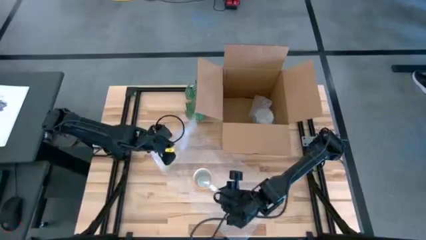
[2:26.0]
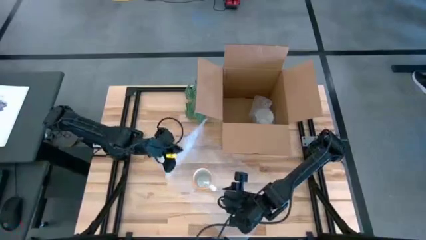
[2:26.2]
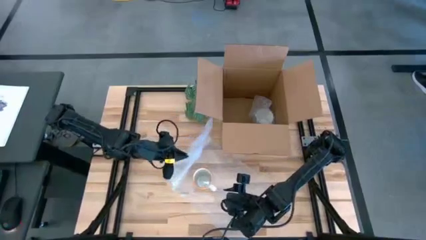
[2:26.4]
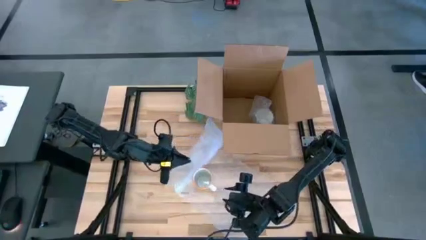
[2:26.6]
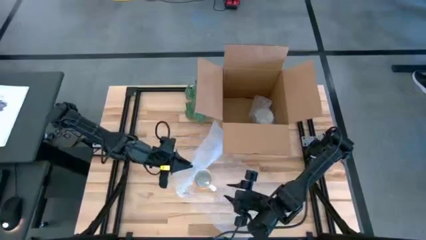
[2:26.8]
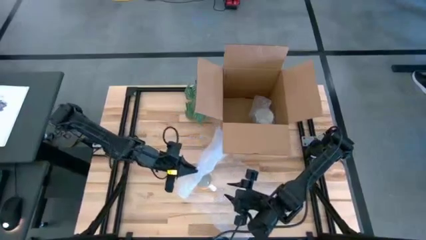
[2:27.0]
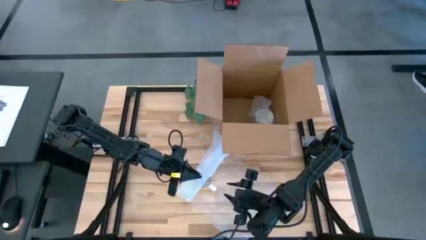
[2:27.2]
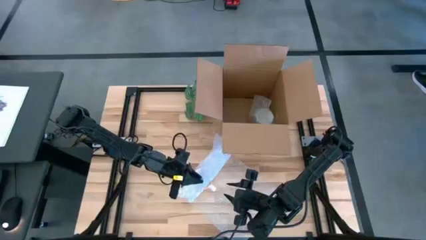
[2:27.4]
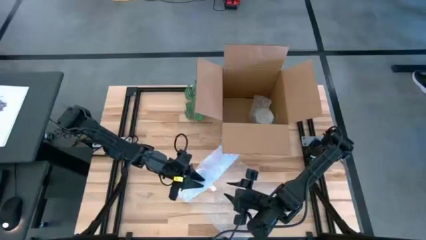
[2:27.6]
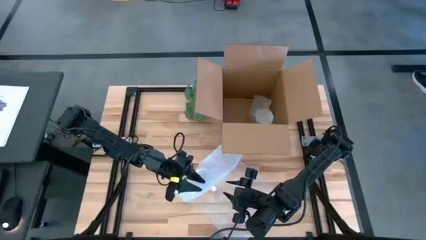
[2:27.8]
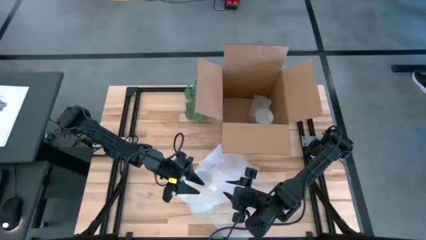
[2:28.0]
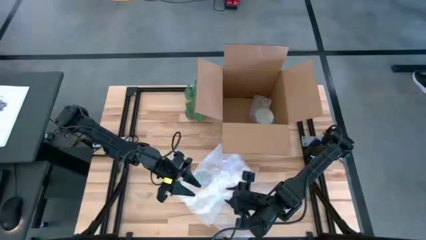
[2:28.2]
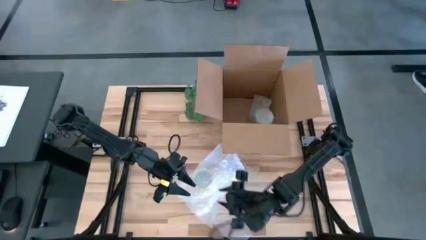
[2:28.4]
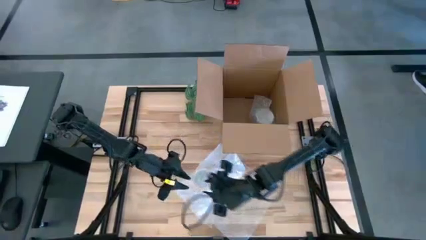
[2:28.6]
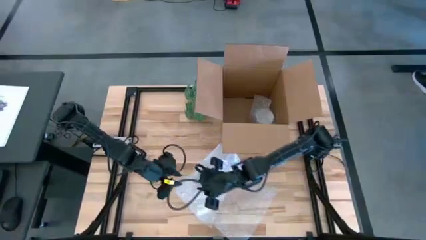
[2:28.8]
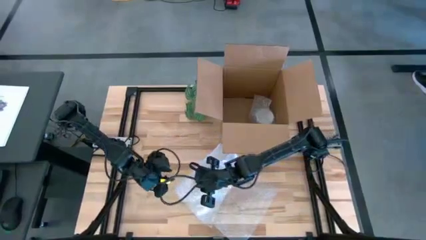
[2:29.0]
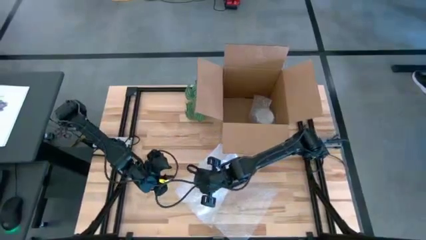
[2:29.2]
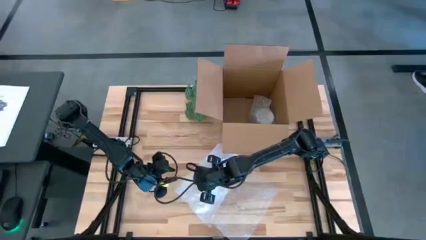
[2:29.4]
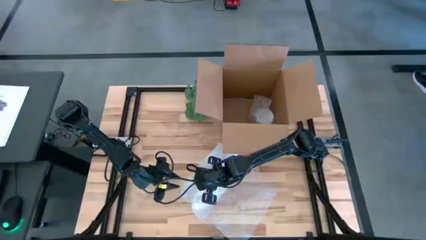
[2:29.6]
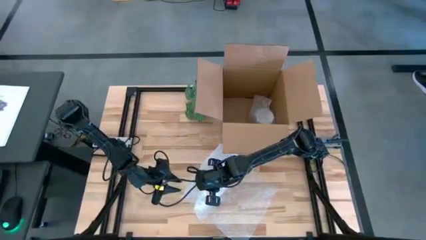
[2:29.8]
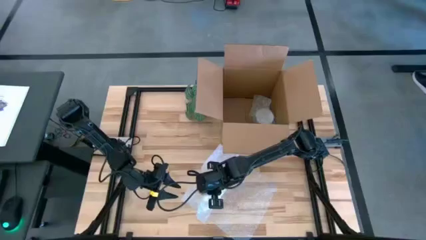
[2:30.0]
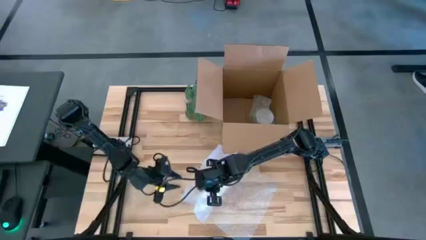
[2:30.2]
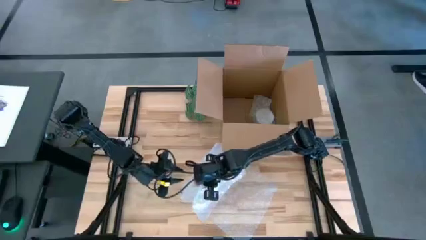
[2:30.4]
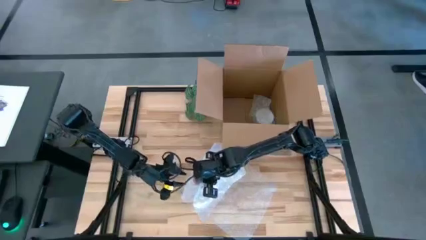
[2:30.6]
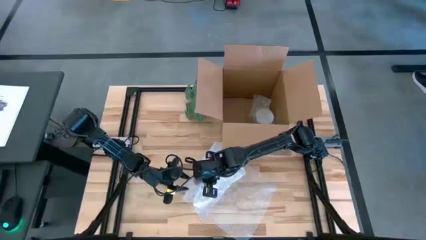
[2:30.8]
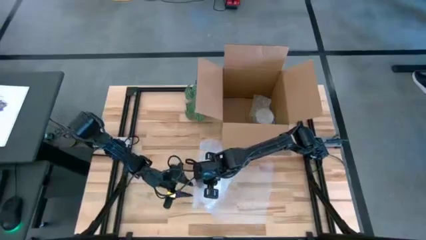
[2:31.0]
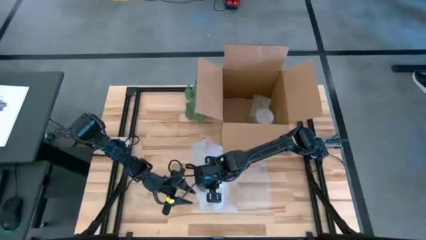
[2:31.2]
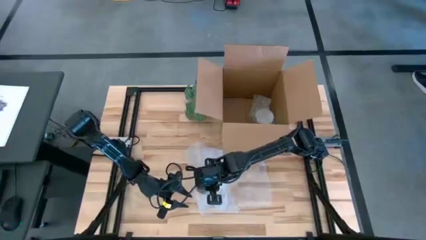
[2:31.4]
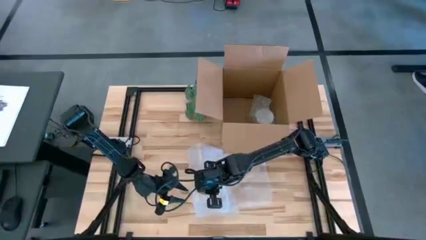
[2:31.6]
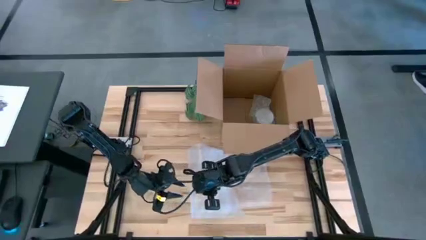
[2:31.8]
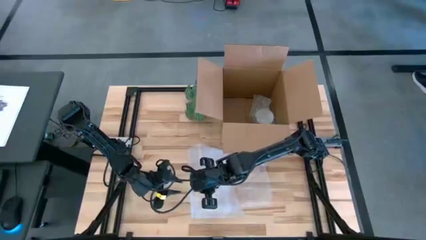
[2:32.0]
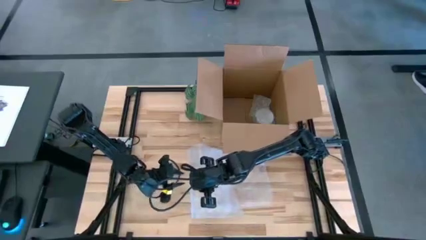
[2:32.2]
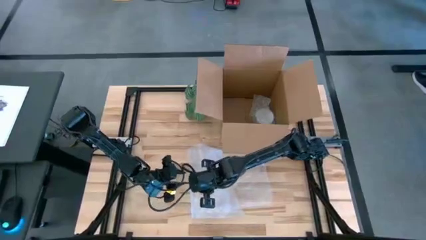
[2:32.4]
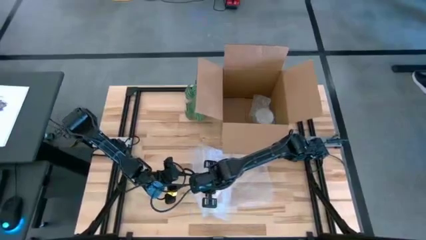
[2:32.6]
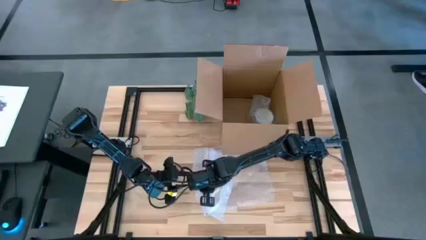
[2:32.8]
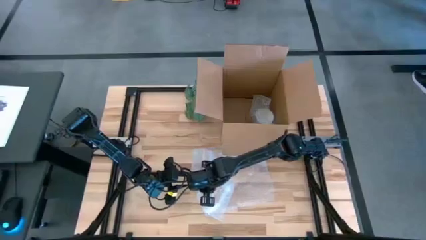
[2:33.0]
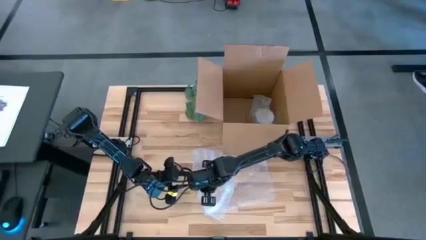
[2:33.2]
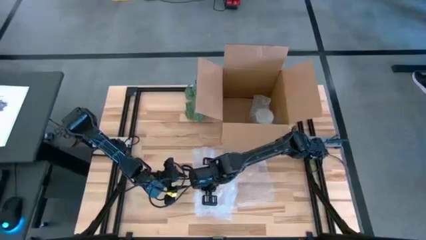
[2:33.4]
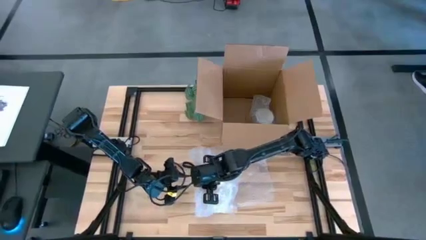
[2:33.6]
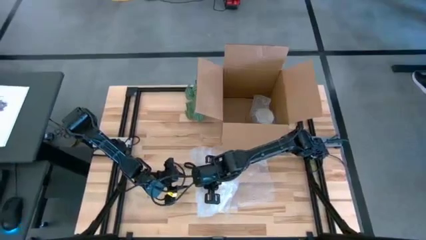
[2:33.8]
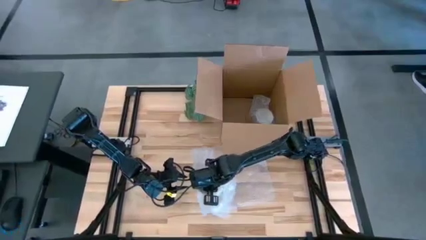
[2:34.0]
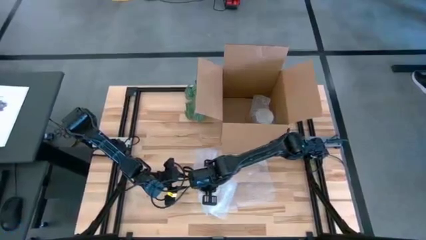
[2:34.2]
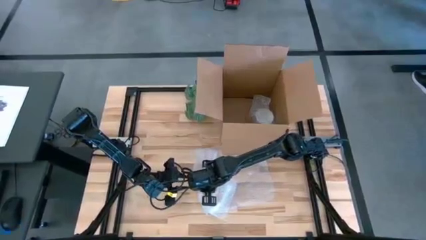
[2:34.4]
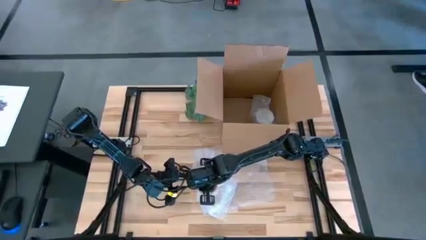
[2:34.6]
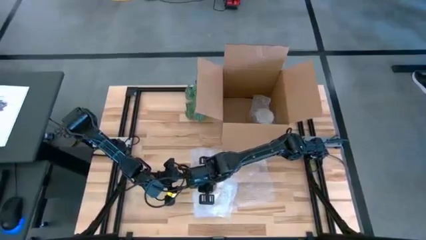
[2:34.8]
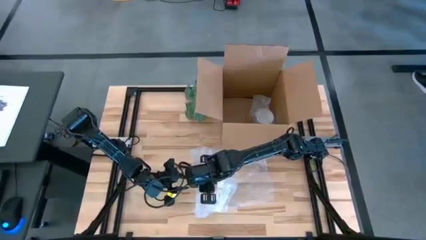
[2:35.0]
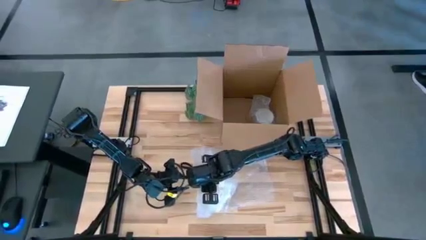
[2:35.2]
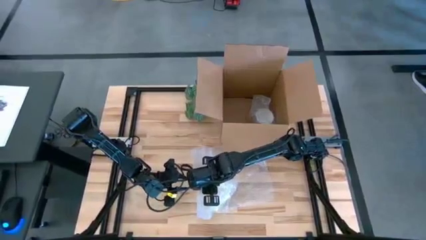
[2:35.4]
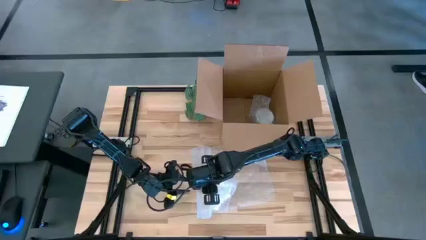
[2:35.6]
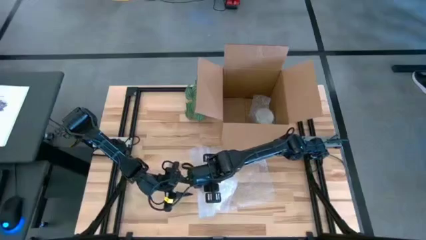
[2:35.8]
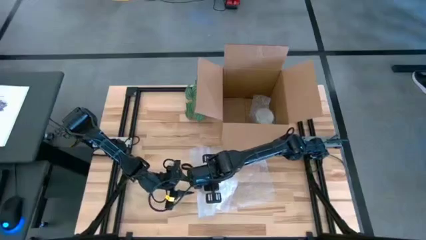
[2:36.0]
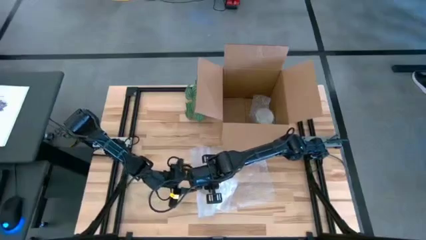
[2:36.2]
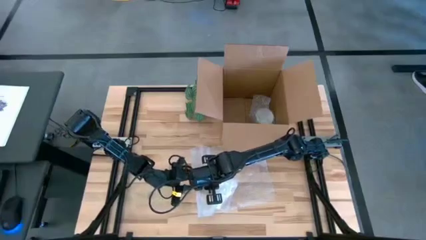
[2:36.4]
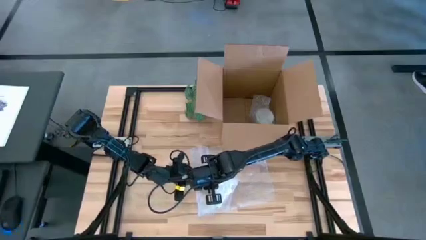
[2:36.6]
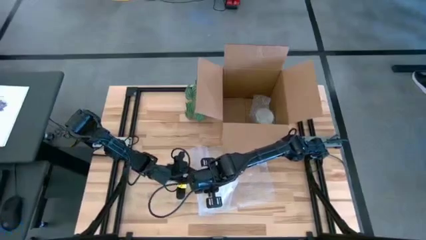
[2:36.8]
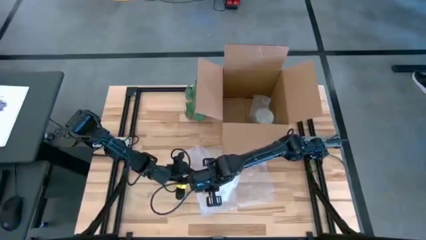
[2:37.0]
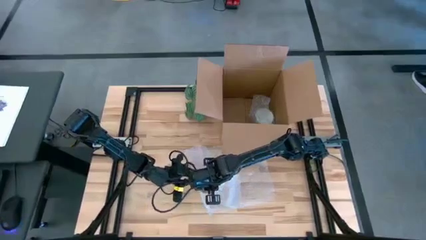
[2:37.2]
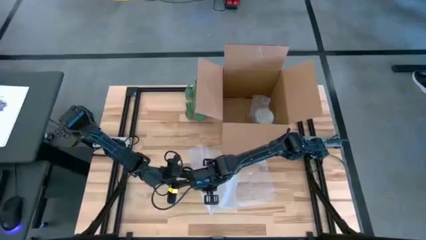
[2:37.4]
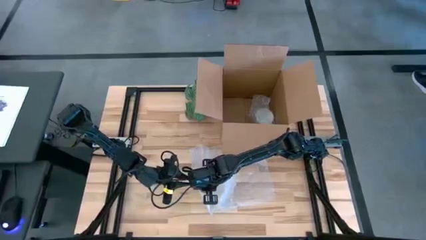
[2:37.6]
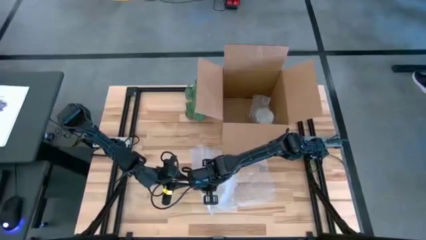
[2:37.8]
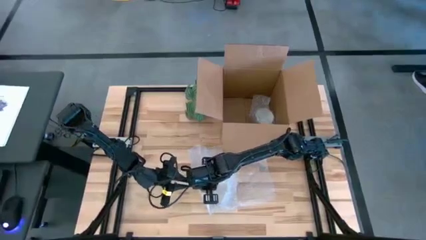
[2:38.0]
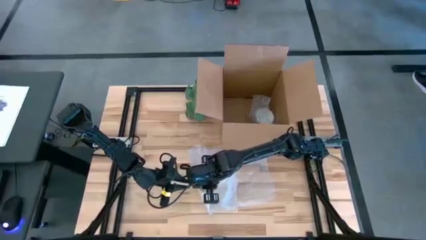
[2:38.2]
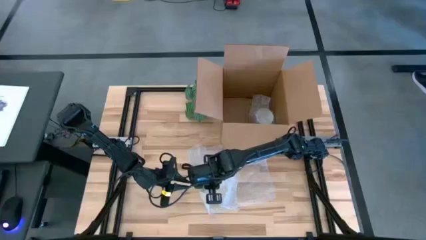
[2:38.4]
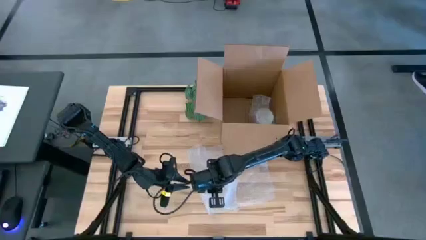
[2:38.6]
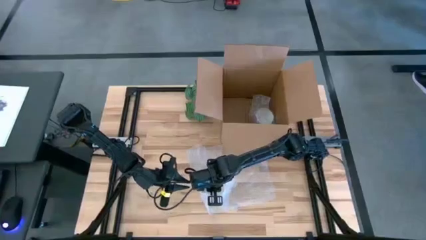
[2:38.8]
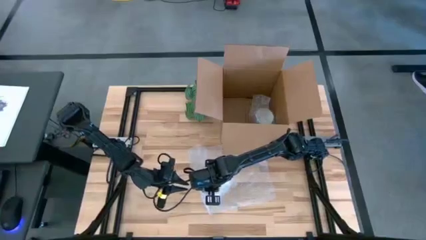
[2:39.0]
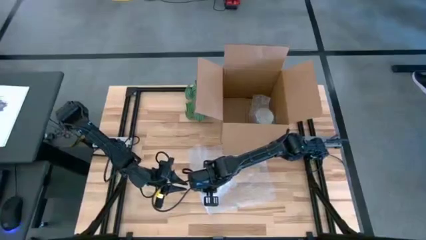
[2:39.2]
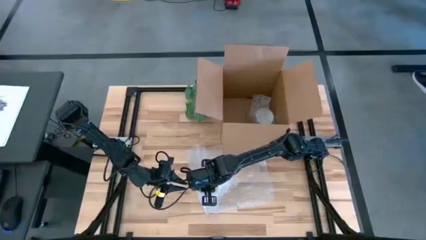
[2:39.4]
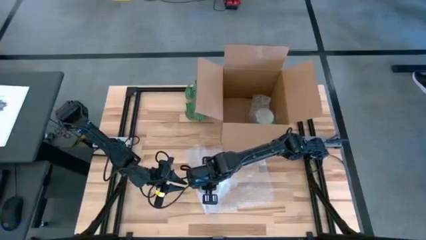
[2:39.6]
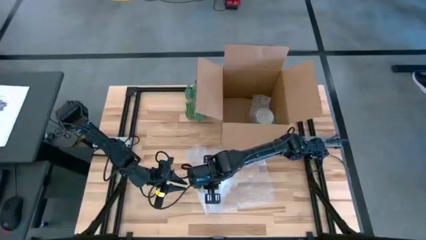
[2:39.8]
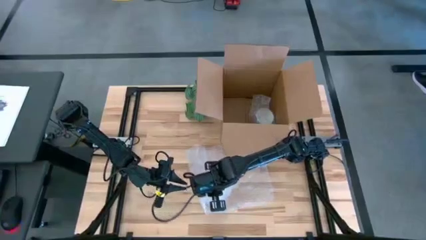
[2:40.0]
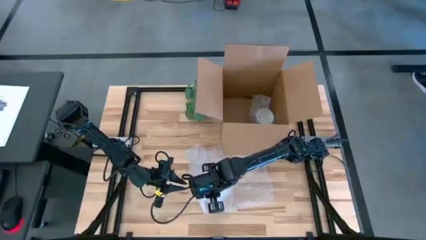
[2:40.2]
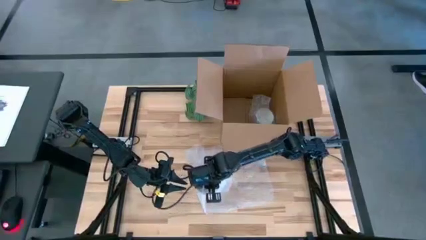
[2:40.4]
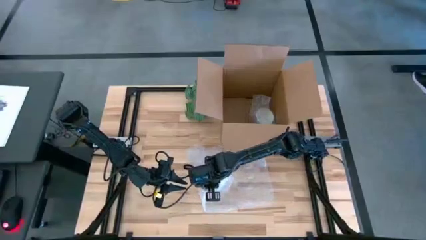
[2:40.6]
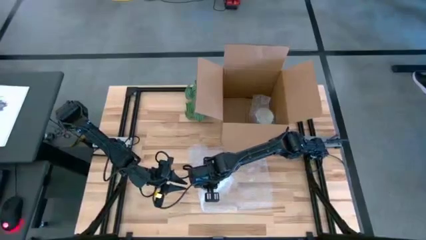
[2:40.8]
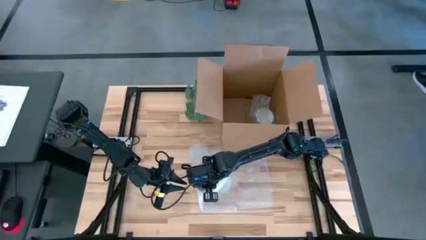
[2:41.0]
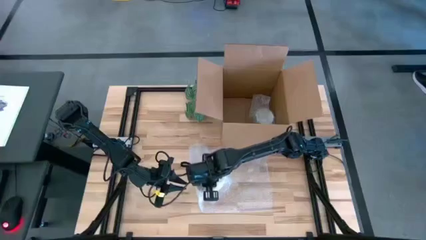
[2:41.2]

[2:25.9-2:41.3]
Task: wrap mug
Wrap the orange cup with the bubble wrap

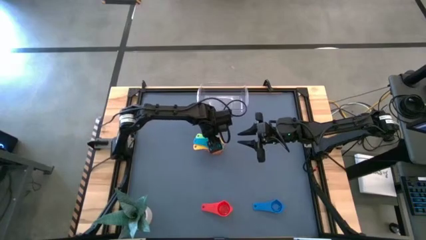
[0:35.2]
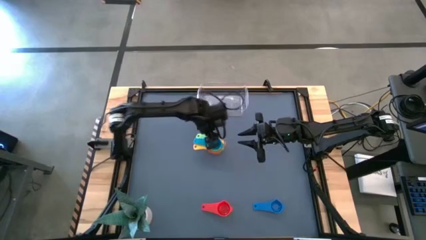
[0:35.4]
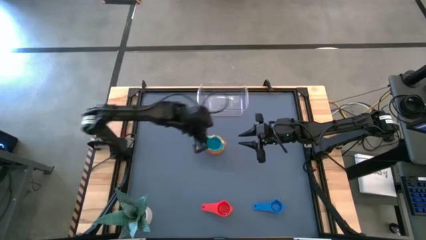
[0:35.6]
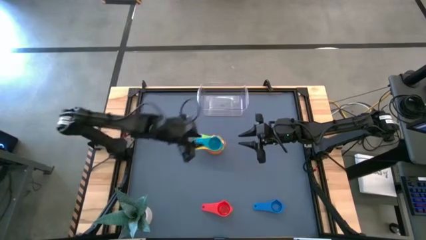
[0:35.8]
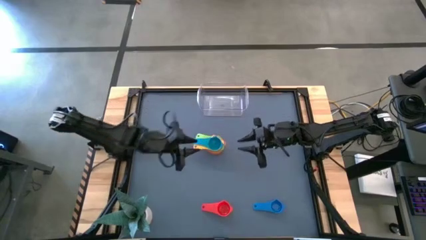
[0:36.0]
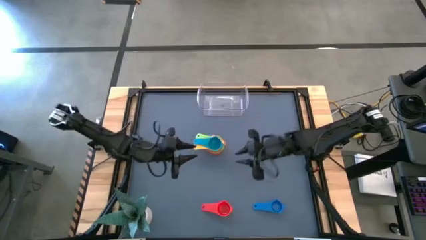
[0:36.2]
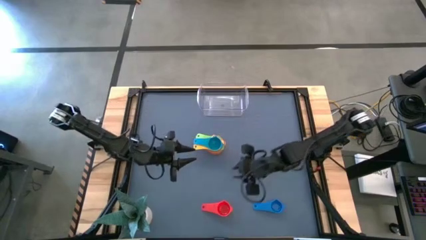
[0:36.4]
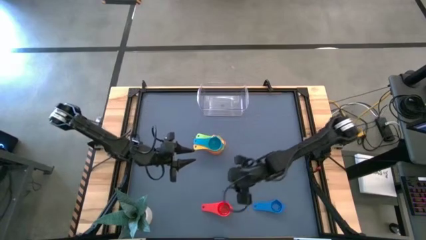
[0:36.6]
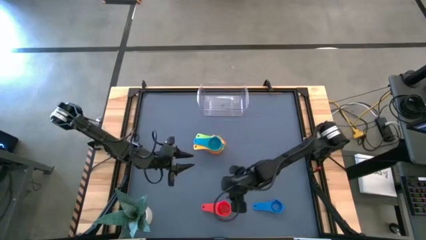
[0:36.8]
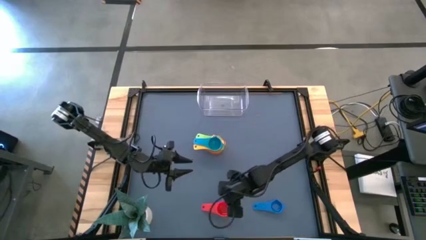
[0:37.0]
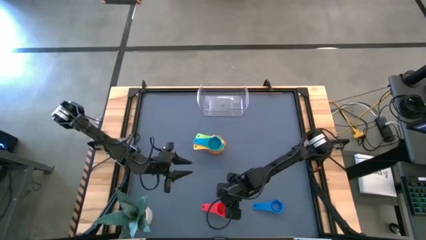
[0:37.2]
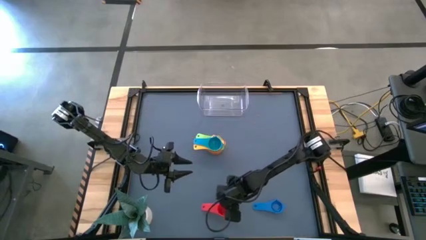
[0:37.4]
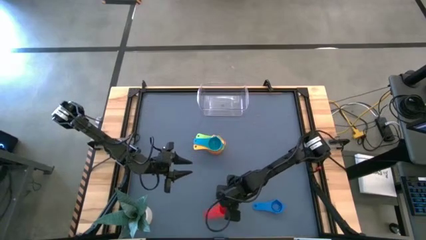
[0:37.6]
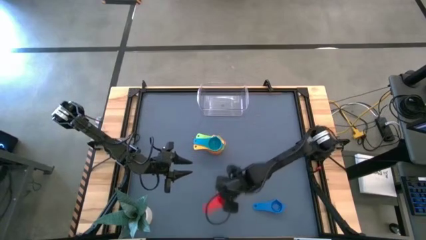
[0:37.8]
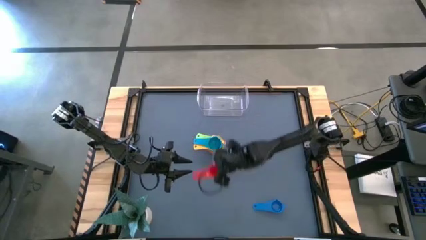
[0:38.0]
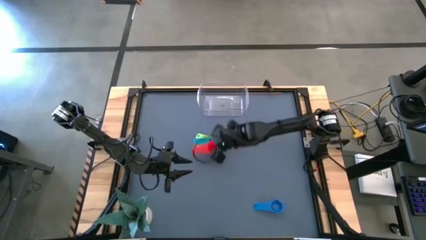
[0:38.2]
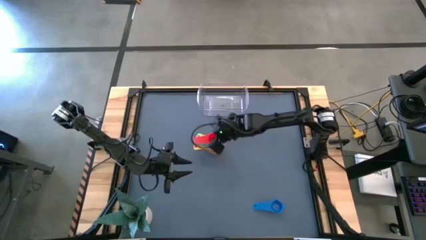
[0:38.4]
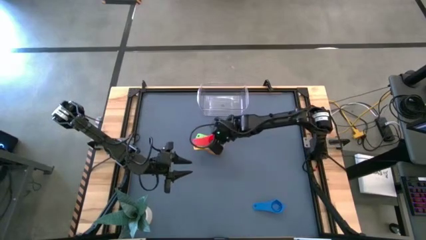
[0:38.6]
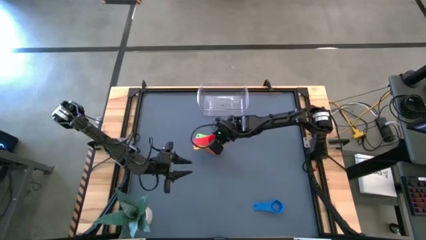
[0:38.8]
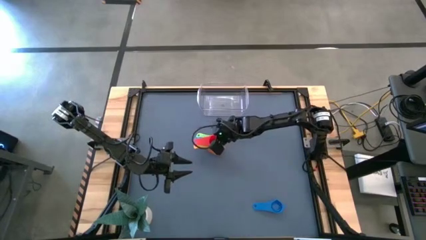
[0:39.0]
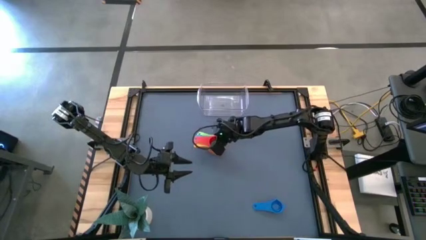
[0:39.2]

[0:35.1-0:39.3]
Task: Nest measuring cups in basket
Stack the red measuring cup on top of the light blue measuring cup
